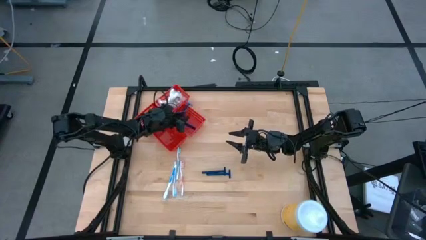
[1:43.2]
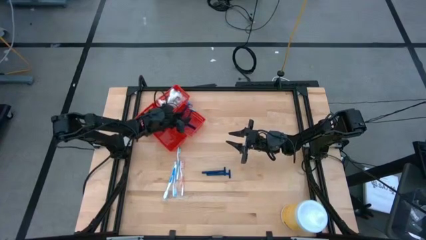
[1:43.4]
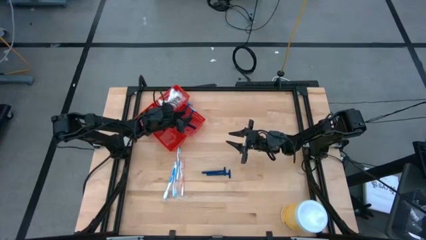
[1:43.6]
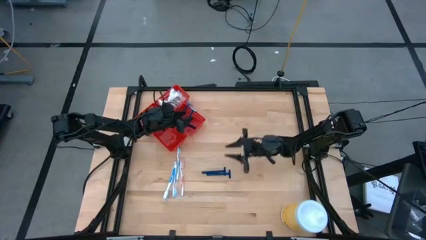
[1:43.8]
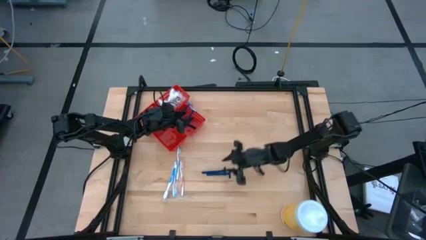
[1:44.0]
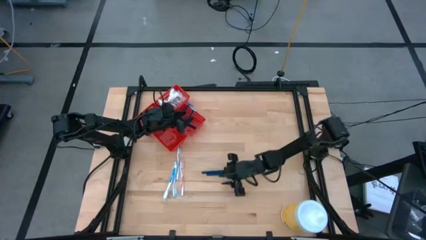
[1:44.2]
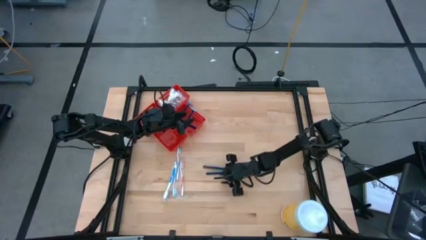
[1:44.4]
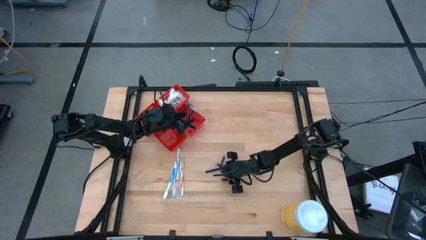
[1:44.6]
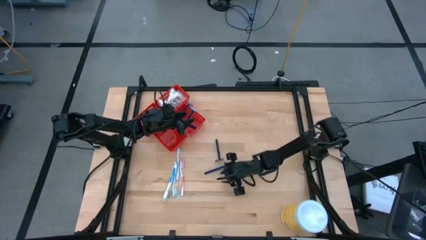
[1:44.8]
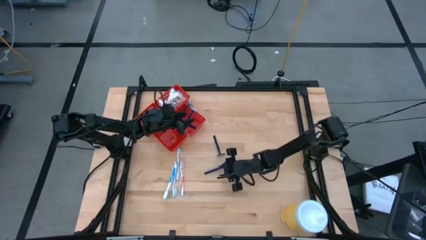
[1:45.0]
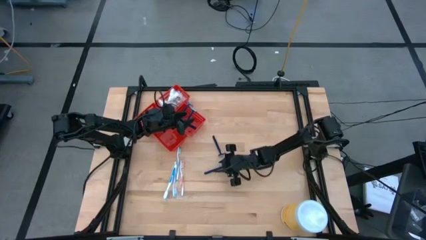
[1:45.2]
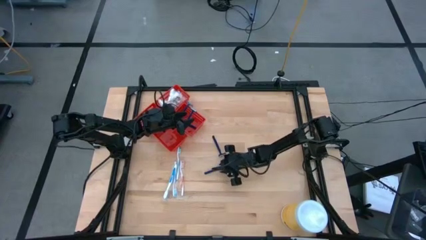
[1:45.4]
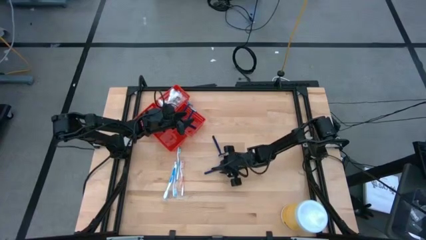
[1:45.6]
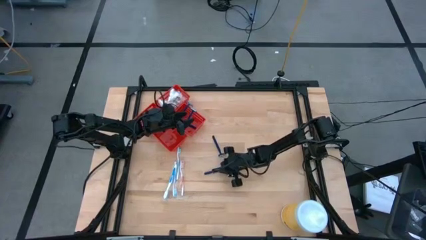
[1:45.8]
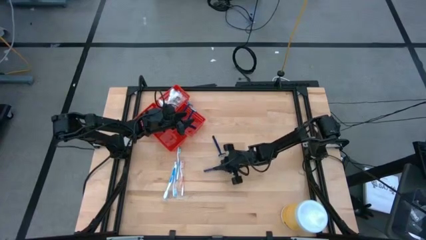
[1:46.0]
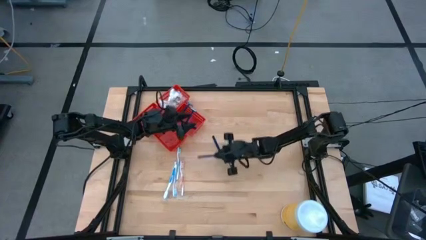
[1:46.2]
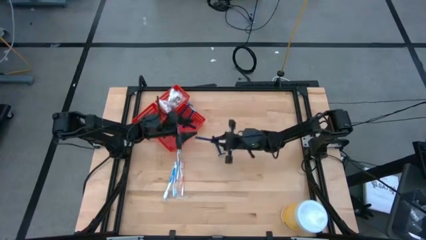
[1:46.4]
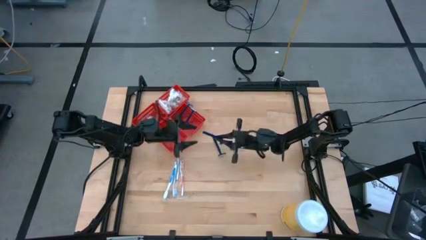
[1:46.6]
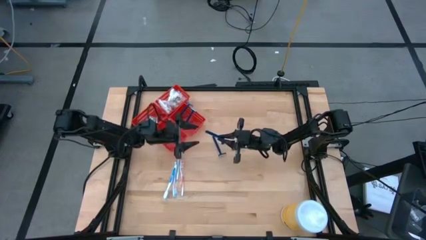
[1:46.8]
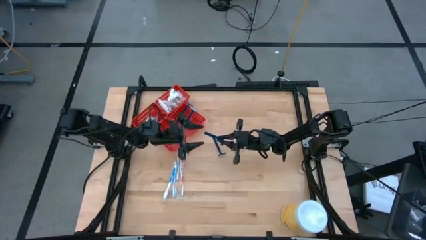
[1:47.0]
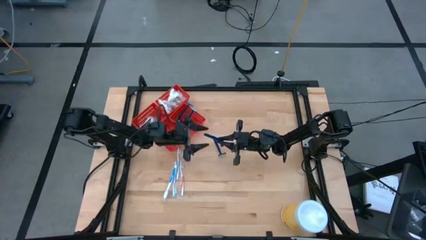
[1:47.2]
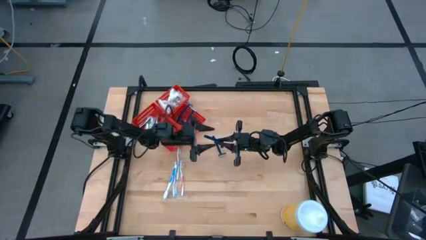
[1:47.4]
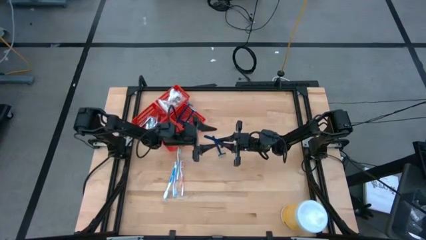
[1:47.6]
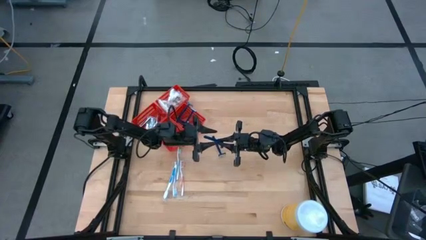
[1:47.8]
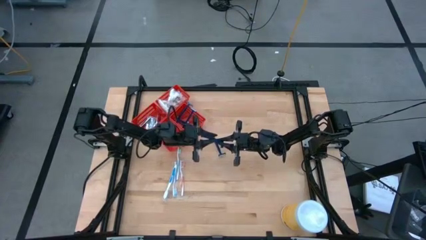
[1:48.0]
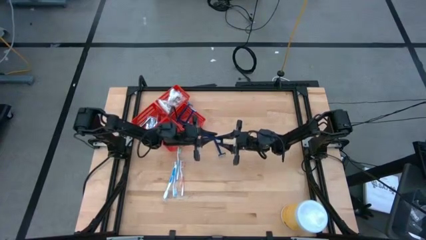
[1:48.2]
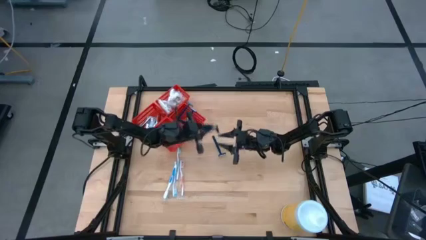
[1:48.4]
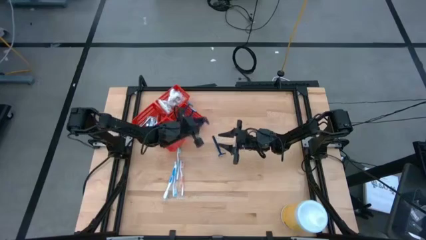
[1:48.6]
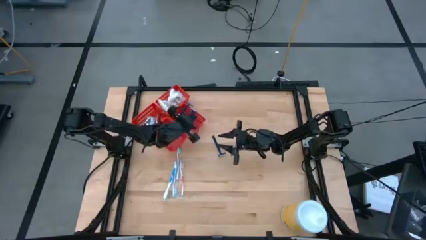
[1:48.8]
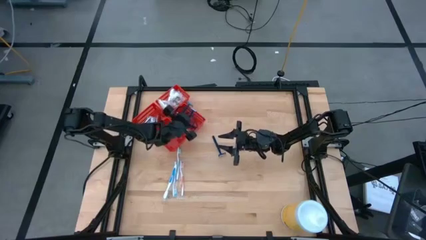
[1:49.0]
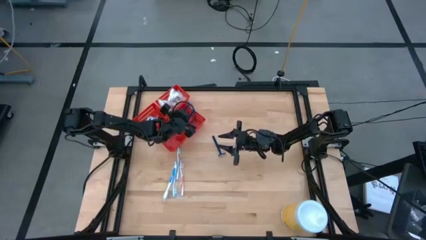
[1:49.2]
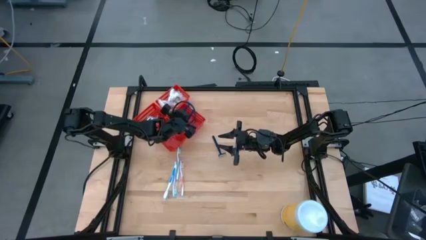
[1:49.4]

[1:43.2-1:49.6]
Task: Pick & Place Travel size toiletries
Put the bottom blue razor into the vertical right red bin

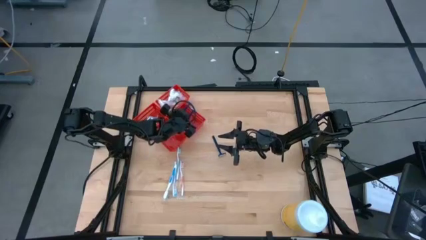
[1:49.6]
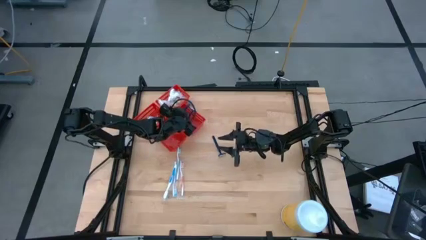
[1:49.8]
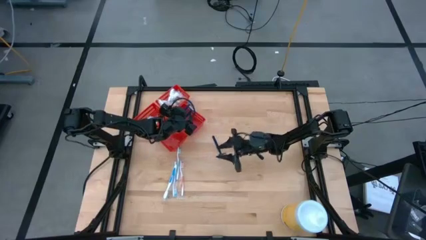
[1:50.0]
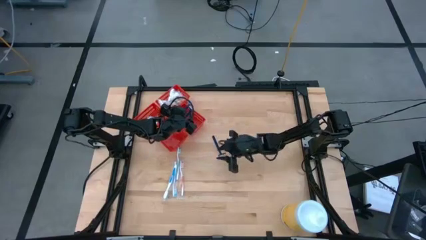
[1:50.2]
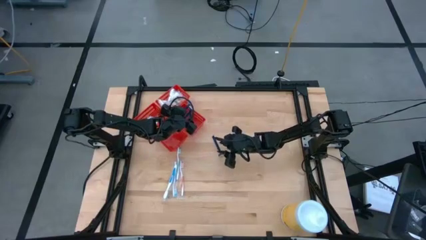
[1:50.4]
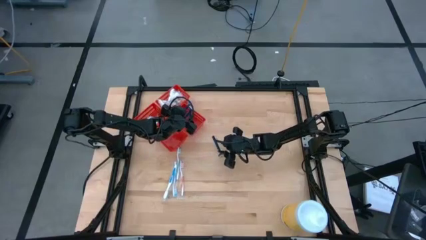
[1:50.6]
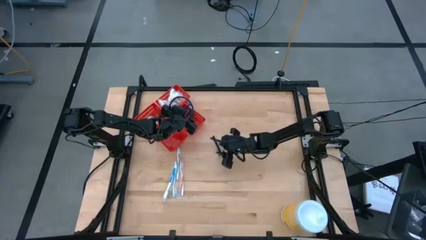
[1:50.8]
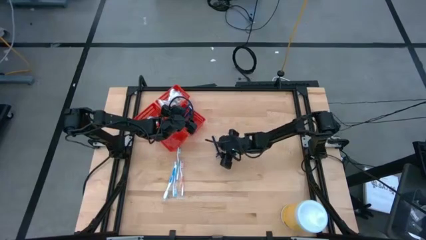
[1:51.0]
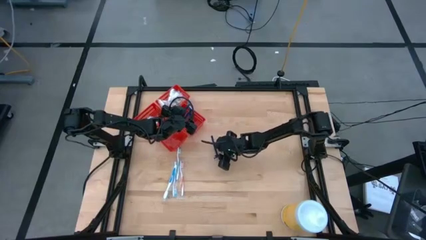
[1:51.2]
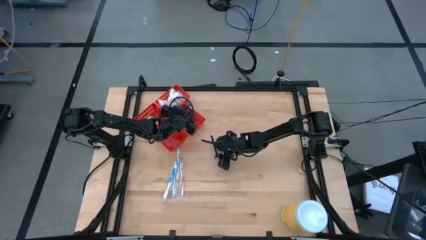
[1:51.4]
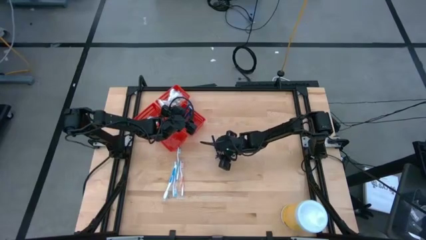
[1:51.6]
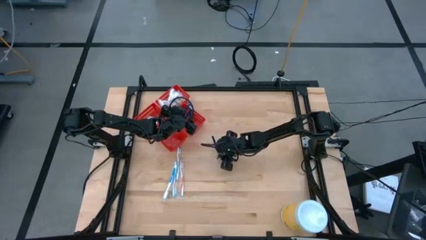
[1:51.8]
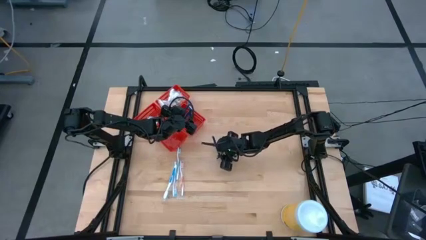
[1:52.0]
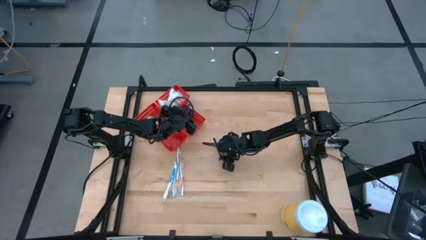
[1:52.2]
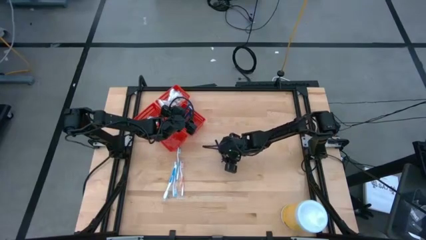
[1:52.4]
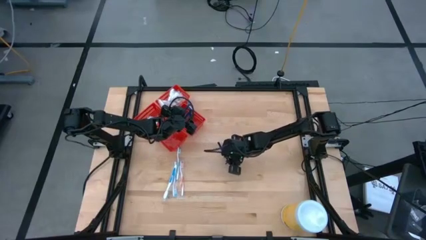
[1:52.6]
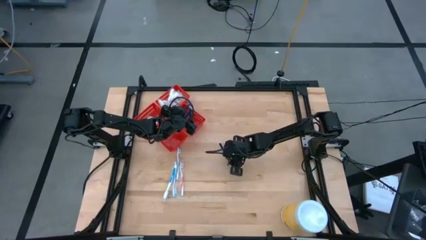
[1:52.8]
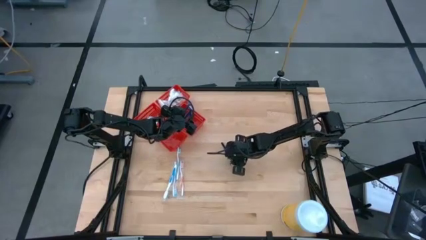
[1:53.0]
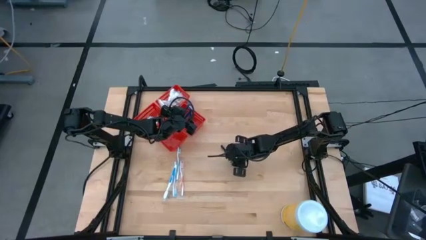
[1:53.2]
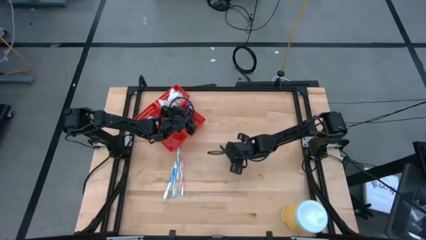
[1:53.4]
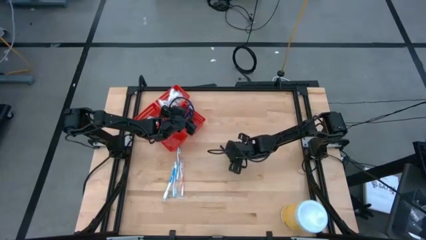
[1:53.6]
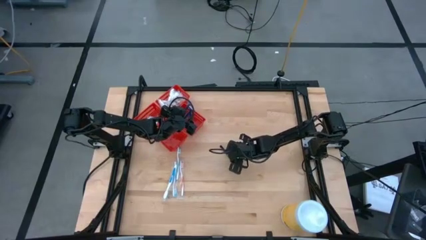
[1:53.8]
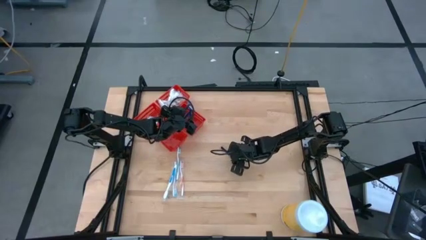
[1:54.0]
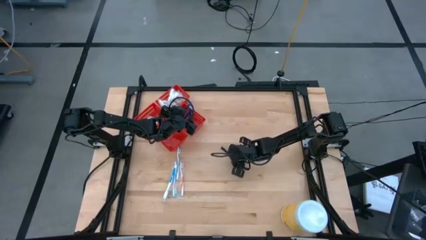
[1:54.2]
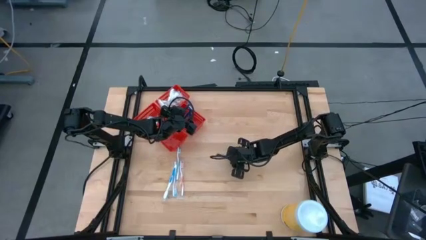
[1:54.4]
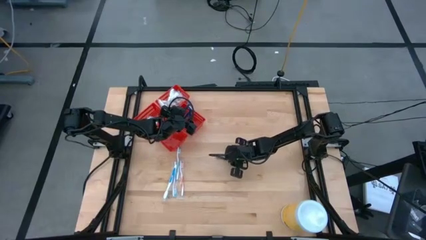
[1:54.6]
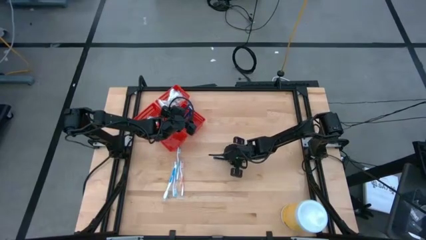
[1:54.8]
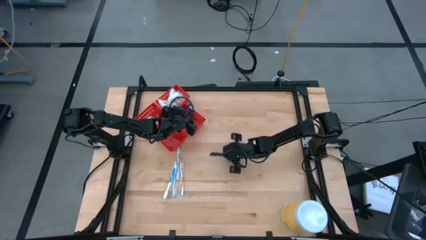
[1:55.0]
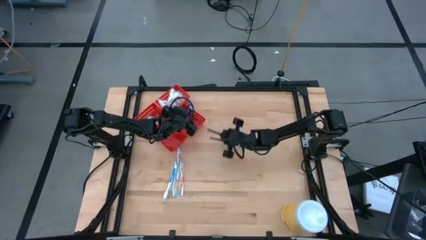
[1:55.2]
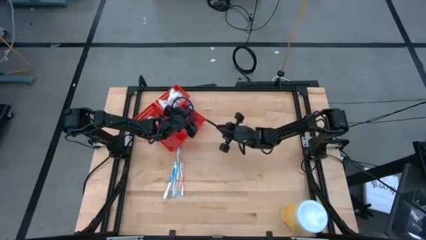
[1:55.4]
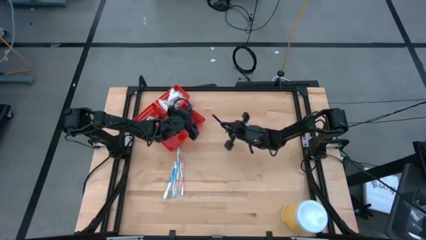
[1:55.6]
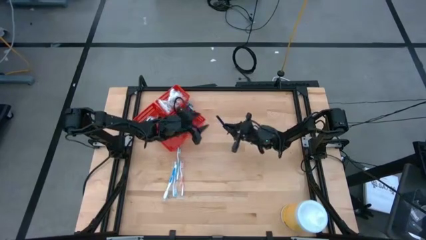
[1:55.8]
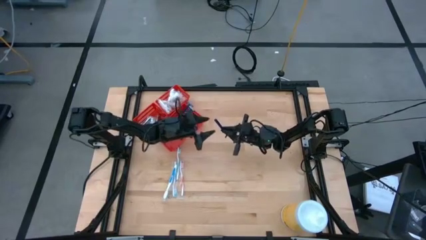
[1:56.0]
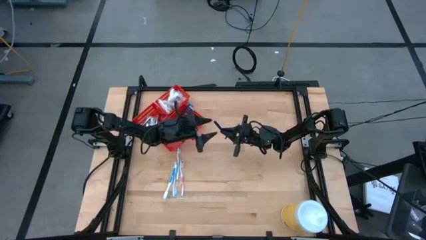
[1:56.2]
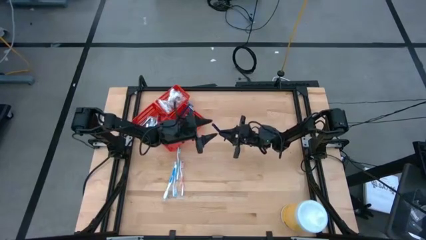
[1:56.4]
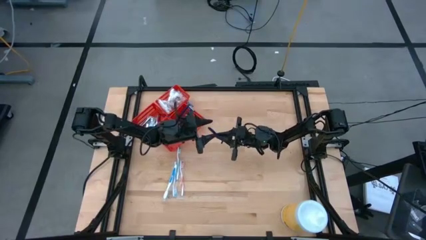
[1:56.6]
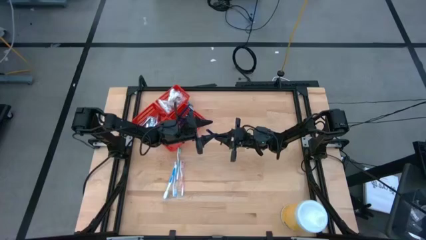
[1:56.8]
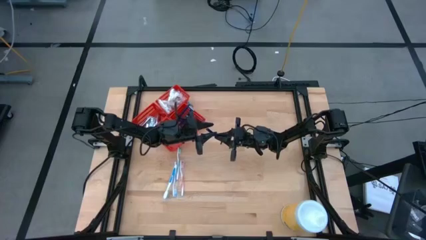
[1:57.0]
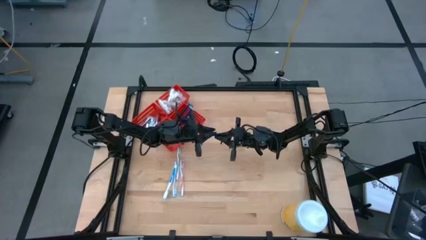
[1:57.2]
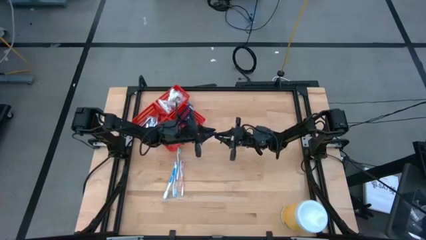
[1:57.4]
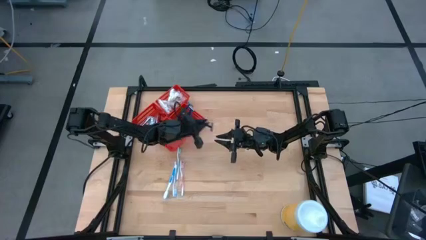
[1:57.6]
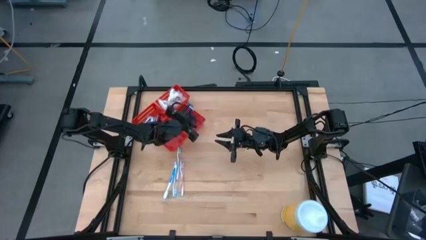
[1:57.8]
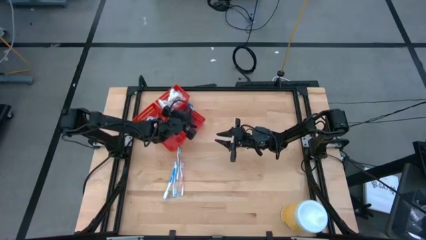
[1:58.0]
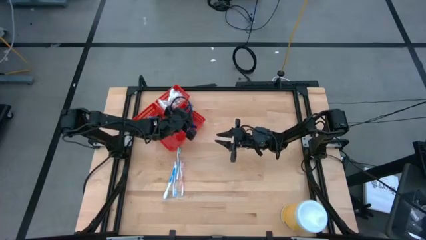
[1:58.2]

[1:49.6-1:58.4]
Put the blue razor into the vertical right red bin

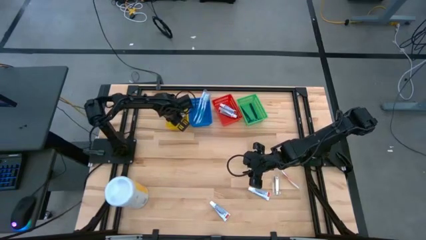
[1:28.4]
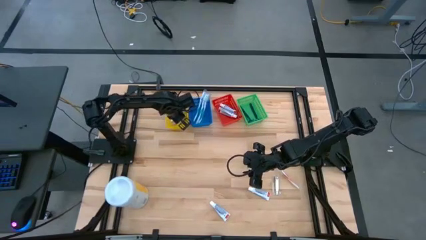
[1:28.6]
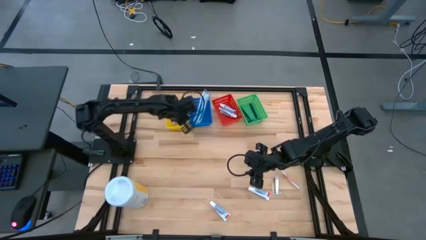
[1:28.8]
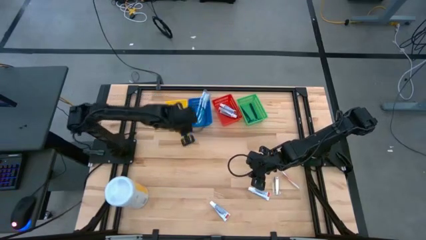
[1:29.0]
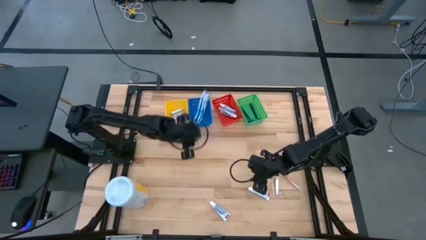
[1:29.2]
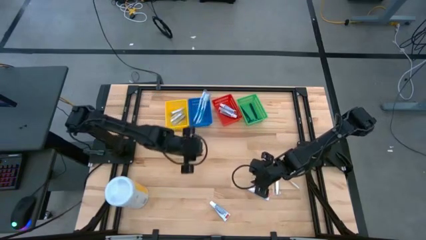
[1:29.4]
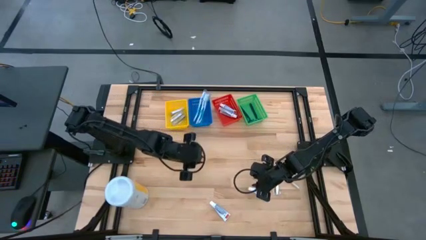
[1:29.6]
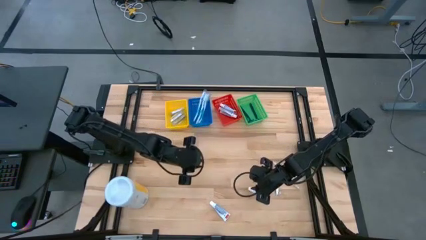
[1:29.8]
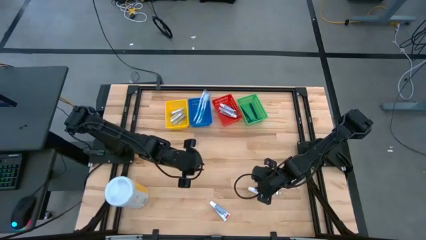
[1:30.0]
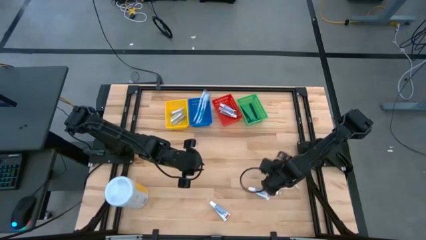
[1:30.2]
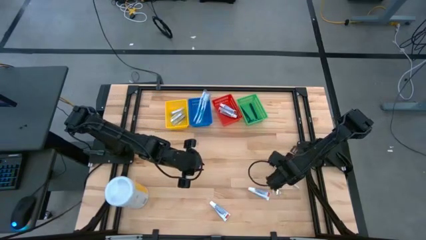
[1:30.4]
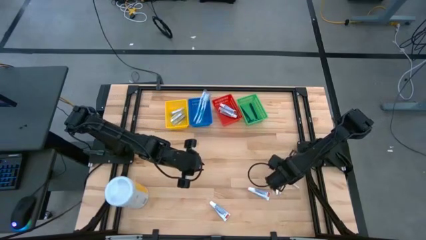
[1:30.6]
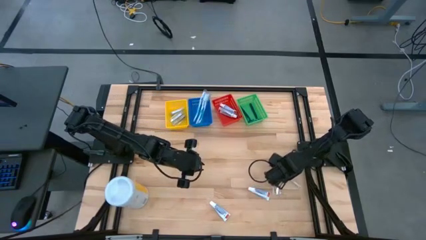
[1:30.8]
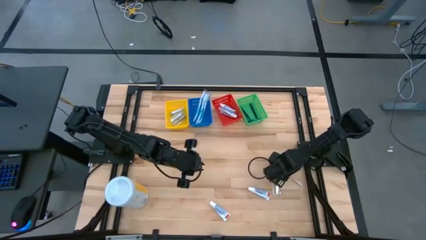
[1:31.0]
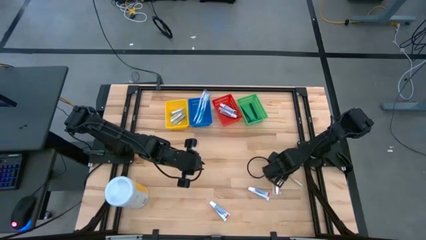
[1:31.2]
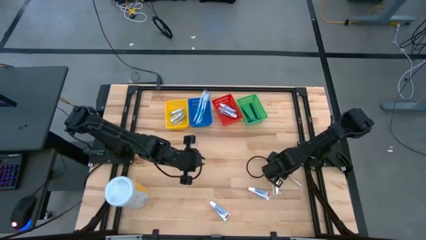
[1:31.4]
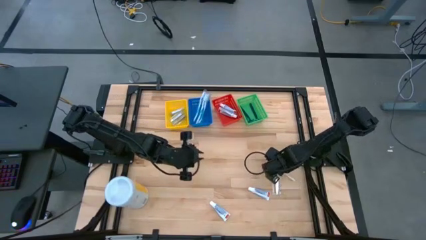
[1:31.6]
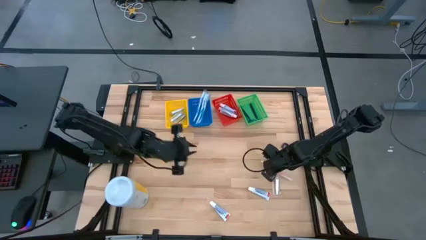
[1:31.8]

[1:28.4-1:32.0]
Task: Pick & Place Travel size toiletries
Put the orange toothbrush into the blue bin
